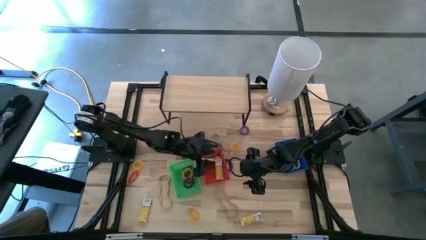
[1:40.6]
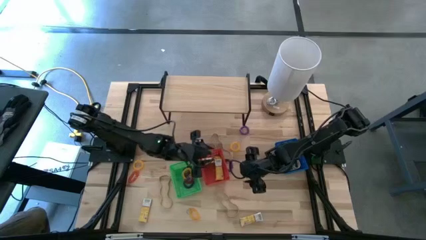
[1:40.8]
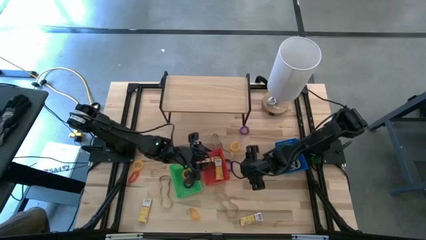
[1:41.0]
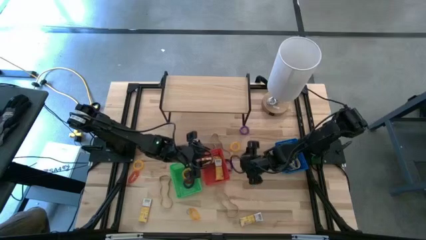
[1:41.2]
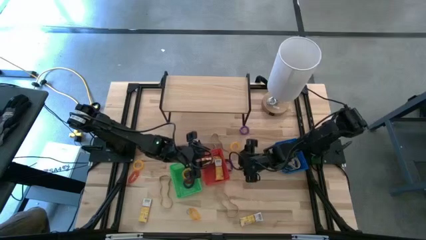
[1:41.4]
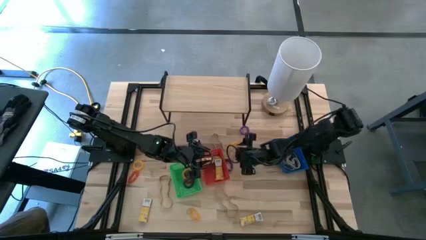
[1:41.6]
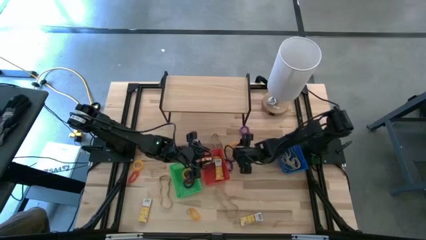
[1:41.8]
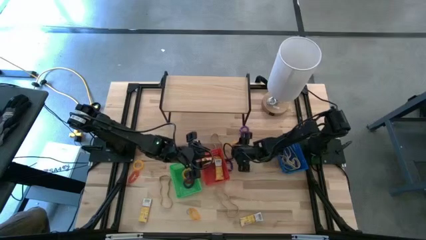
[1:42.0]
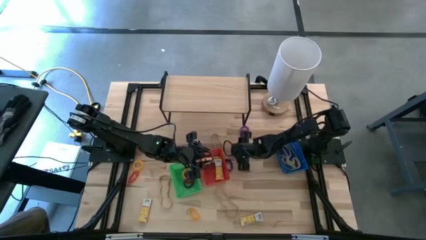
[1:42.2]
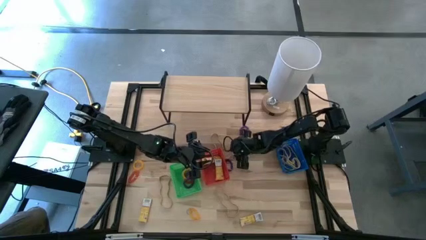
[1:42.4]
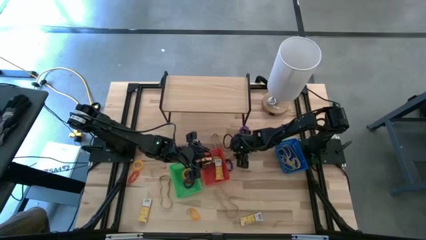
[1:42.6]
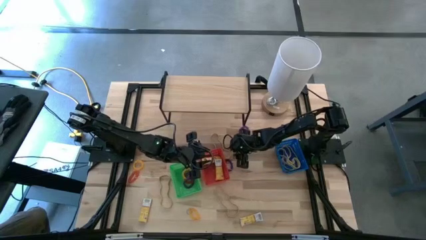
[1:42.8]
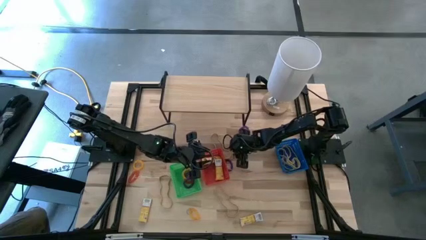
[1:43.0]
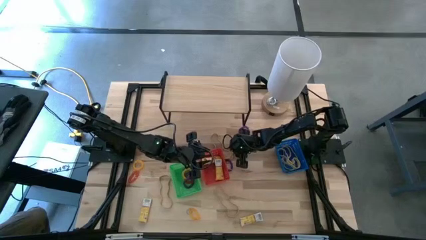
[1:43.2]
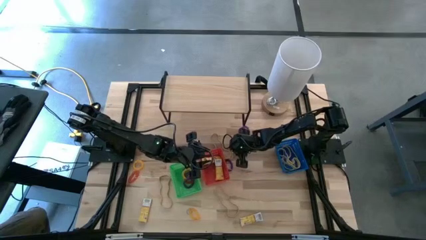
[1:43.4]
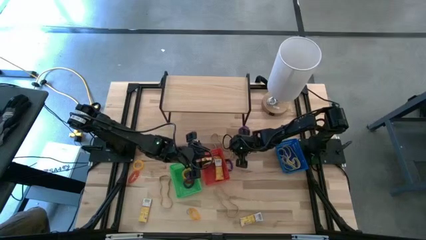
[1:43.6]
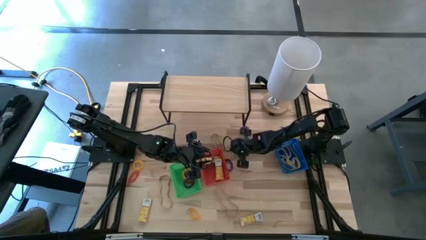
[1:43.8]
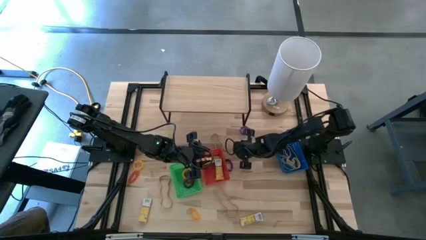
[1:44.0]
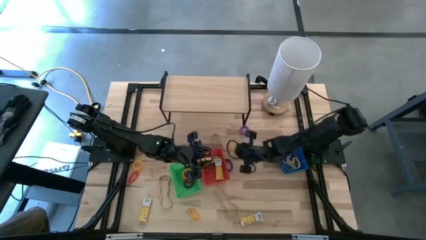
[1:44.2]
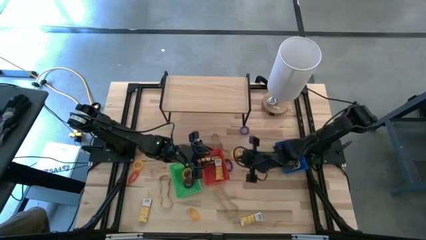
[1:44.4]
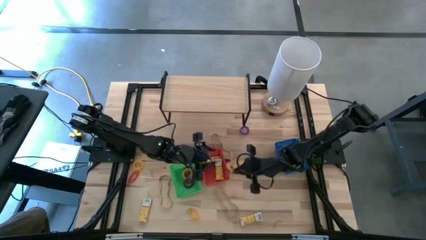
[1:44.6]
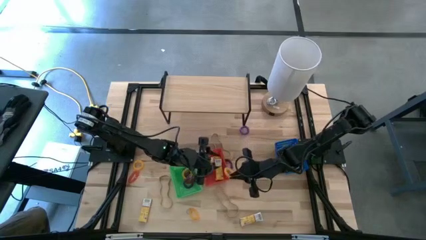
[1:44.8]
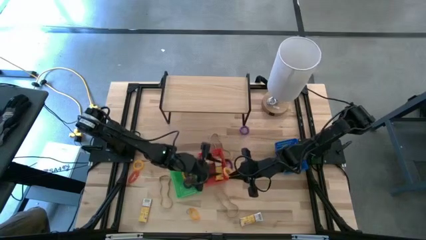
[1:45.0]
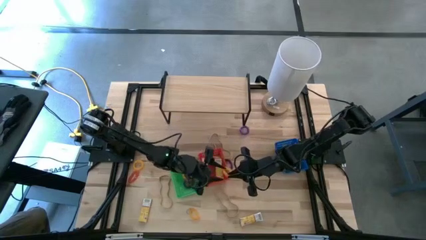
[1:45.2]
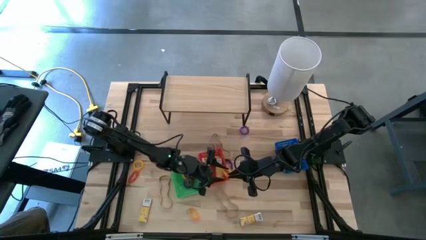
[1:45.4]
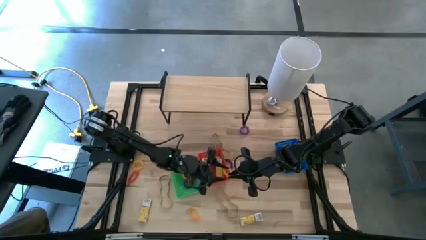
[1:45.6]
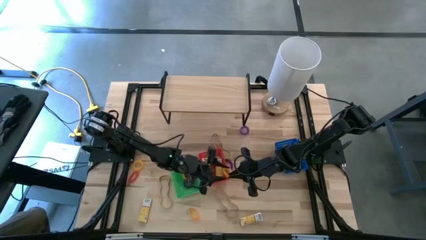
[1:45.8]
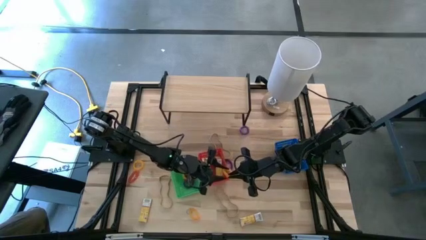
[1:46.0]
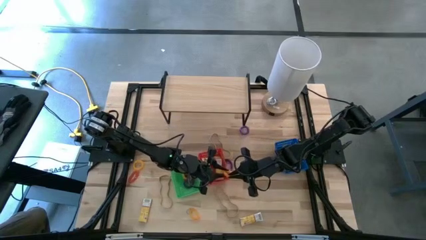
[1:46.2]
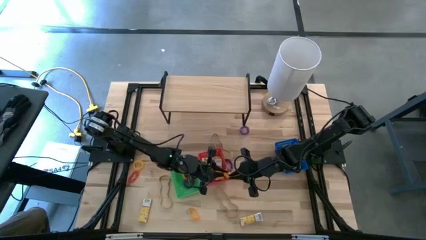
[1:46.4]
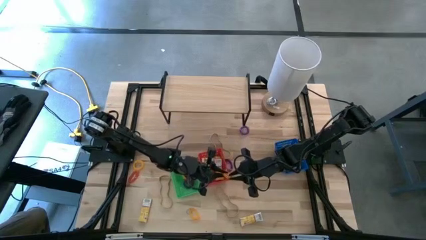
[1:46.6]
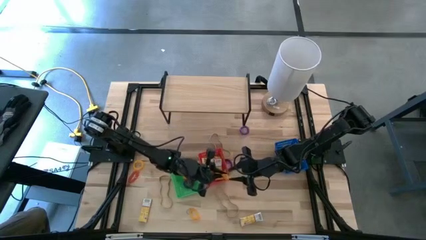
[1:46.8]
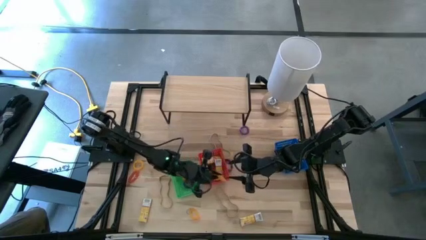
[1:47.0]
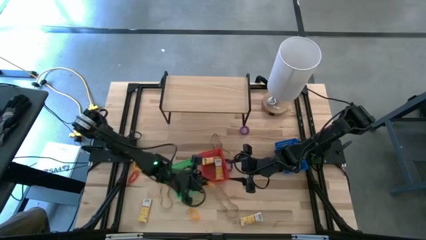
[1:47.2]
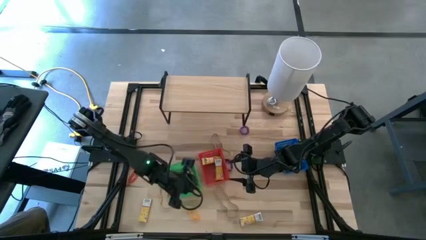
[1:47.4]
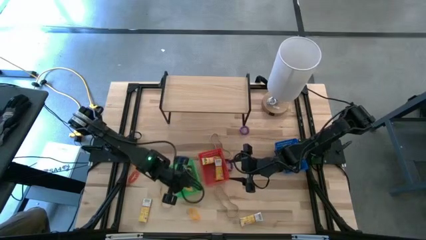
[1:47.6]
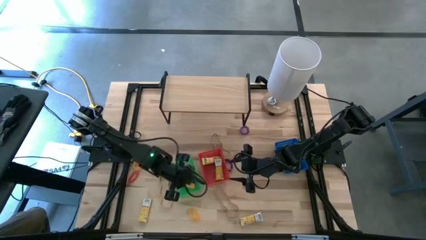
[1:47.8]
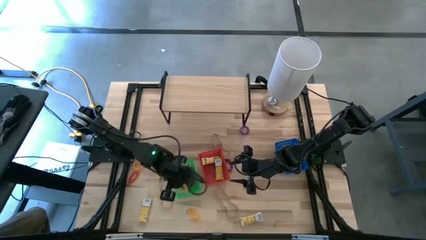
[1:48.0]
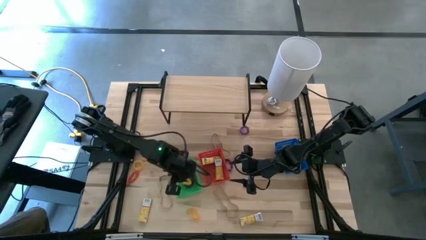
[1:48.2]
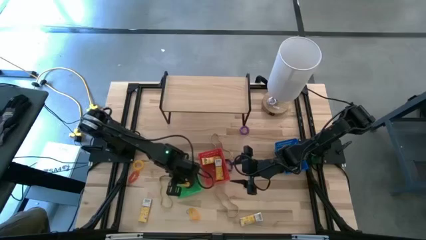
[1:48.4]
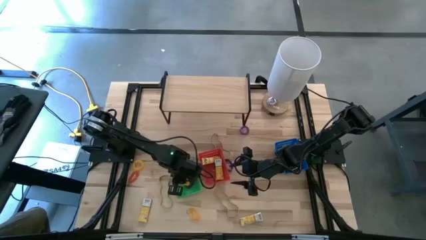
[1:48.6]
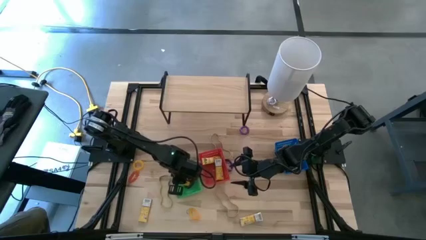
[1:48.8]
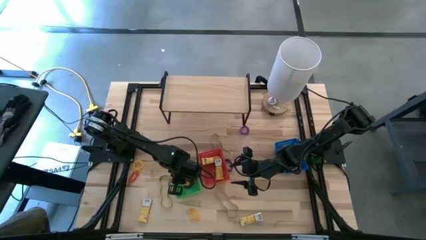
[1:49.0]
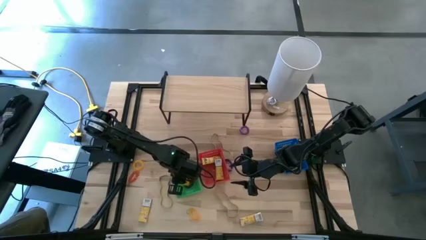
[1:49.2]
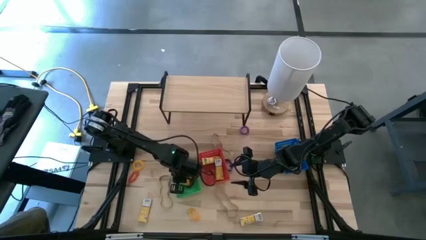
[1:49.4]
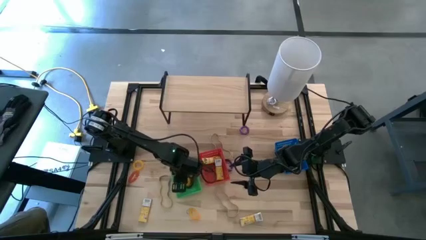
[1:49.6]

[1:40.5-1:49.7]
Task: Pick & Place Office Desk Supplies
Put the yellow spring keychain into the green bin

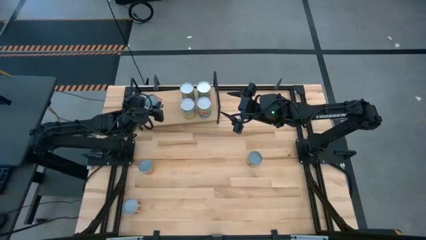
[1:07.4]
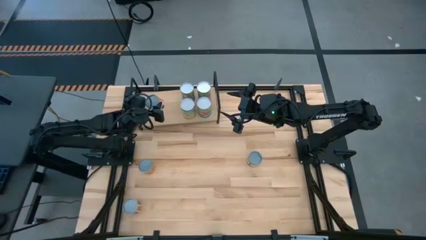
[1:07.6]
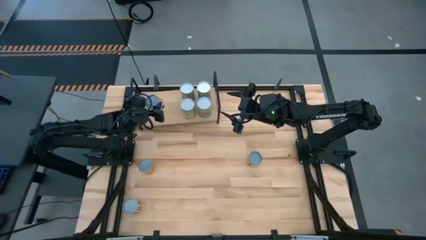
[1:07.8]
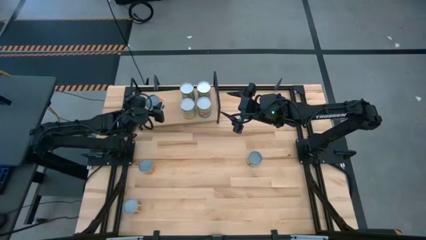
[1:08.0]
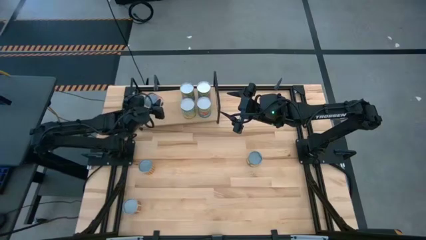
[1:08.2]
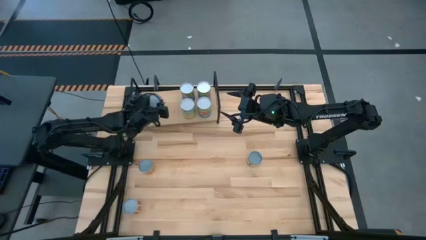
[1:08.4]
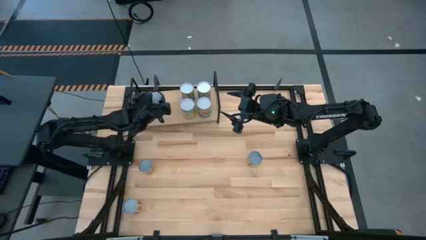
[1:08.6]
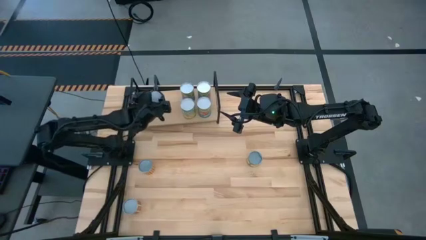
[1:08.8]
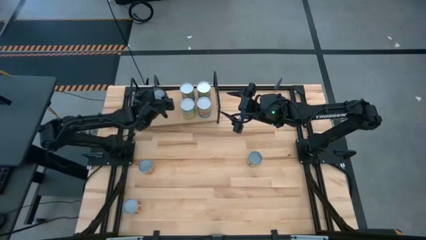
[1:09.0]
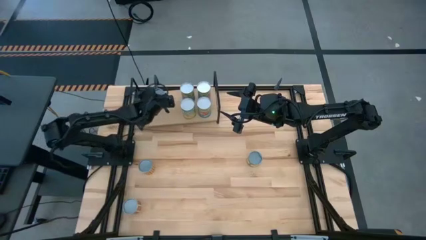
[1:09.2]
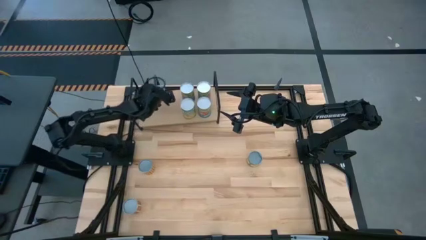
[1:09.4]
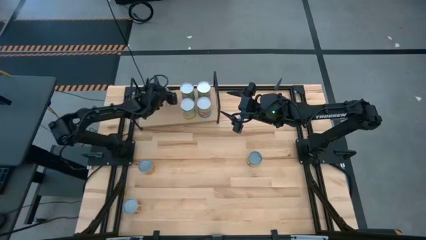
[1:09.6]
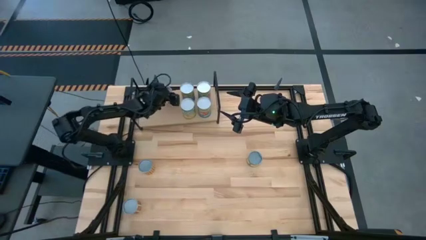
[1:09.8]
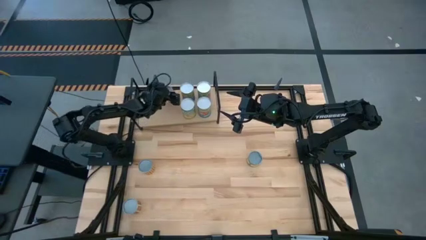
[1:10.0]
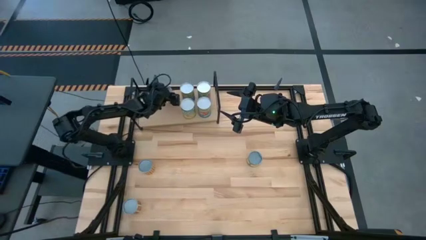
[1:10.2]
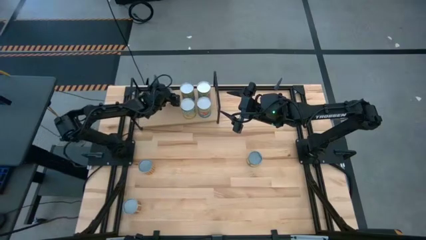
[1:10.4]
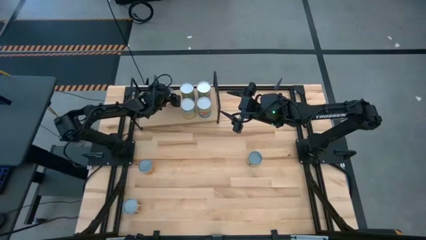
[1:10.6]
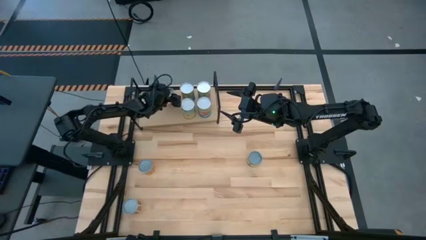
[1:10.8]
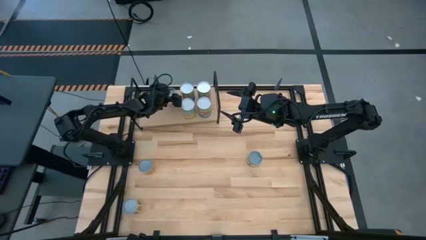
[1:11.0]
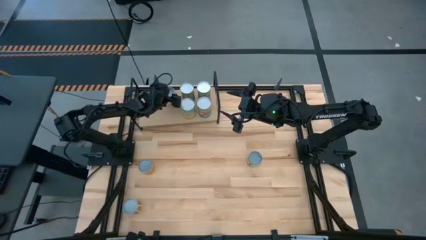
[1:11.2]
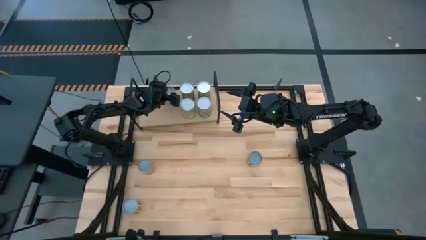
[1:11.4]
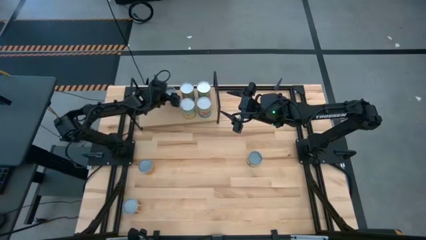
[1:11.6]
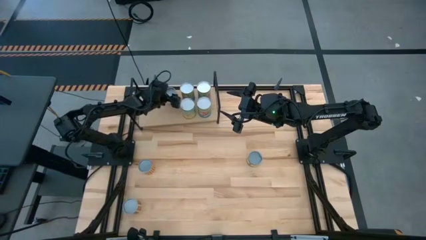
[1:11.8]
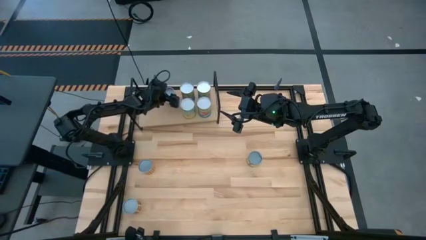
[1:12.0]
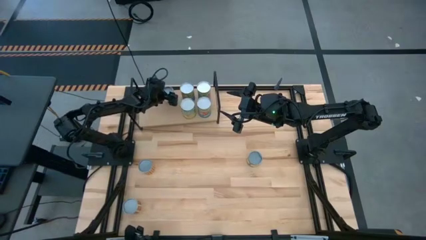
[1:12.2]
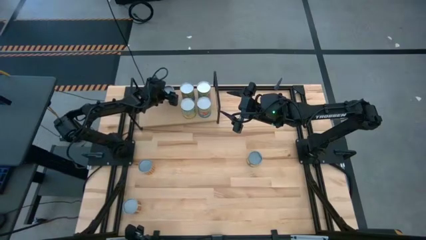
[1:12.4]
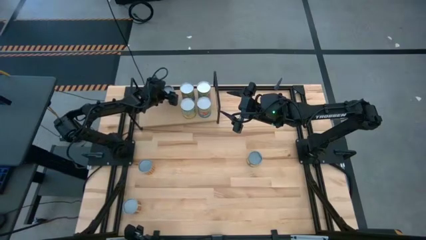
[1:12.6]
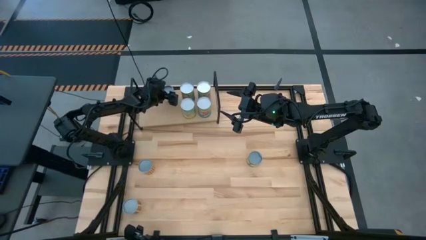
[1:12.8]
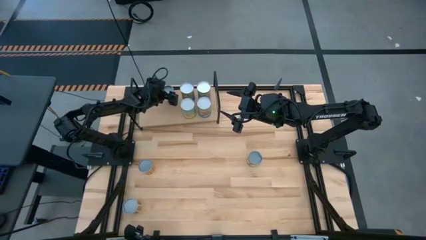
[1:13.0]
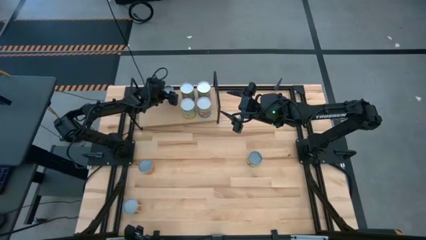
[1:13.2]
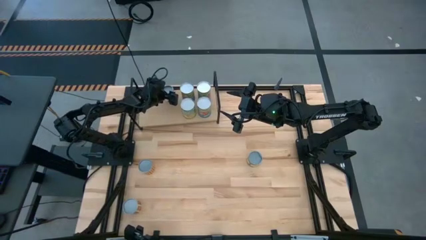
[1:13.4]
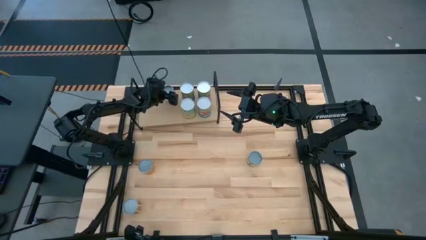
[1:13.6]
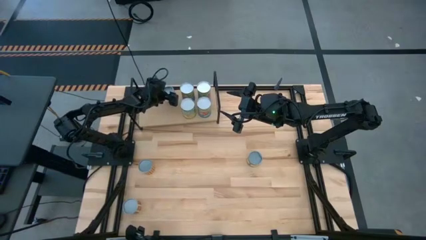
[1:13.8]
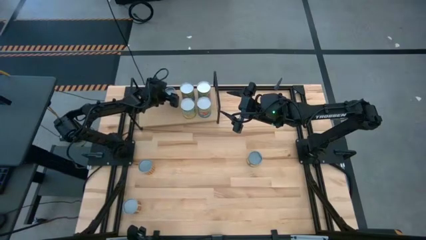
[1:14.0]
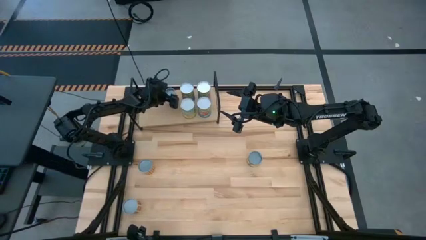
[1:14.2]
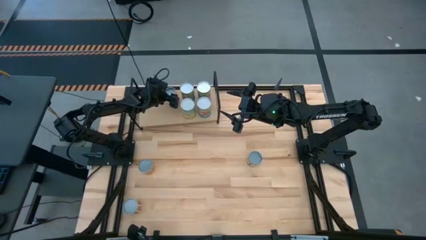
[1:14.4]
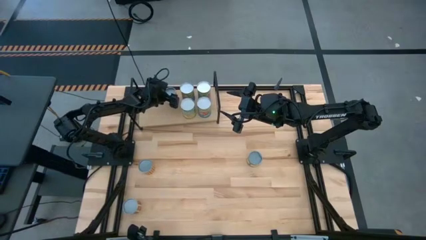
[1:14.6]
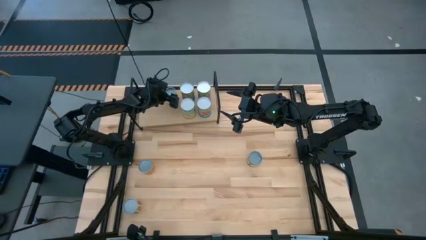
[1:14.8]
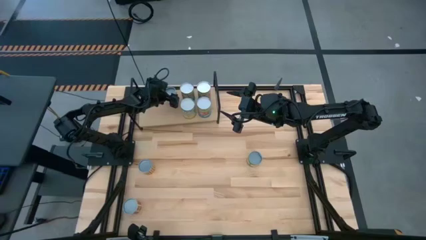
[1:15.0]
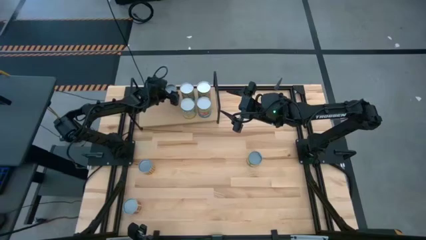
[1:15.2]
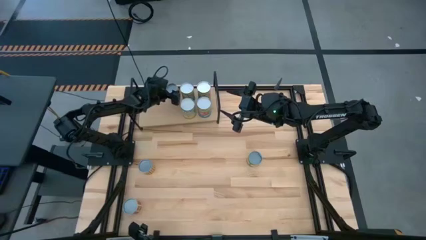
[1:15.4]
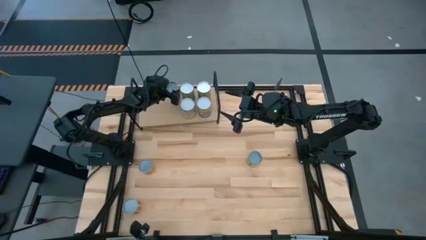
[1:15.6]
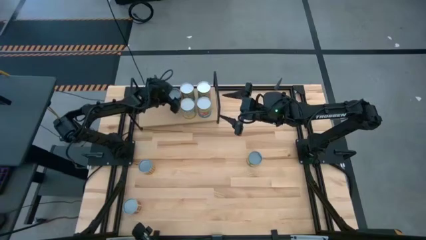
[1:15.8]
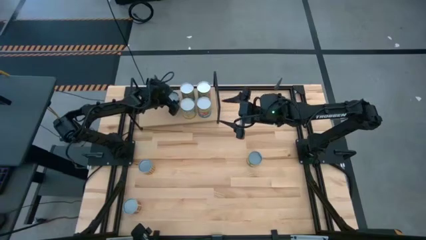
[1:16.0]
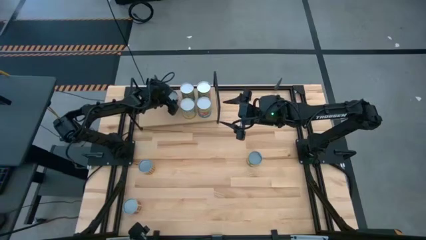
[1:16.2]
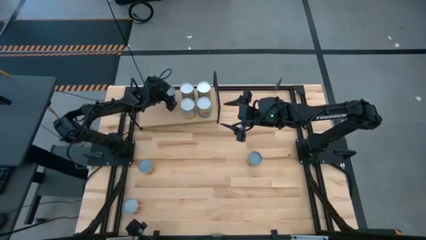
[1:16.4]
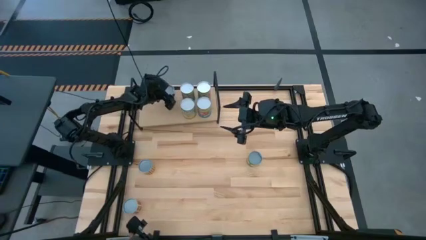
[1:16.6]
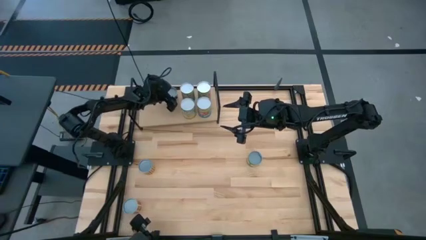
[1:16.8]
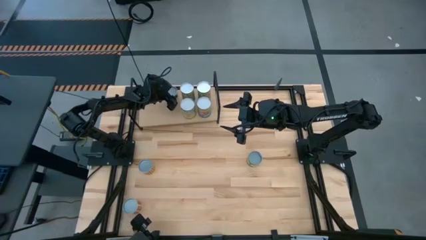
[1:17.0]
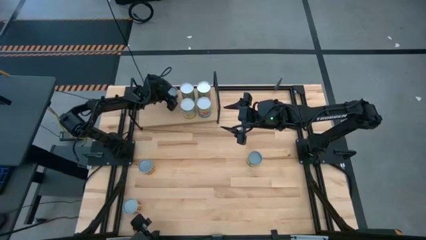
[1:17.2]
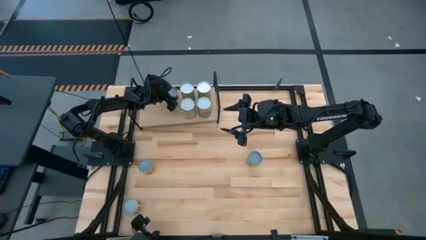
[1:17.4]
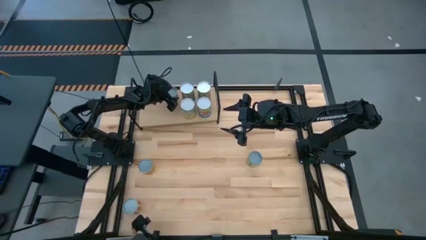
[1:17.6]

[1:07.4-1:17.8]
Task: Pick and place cans onto a shelf
Put the canned meatballs on the shelf
